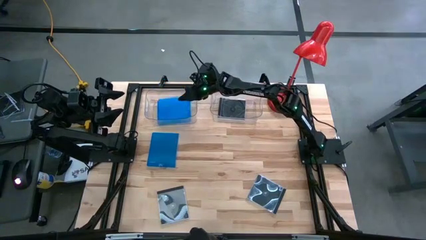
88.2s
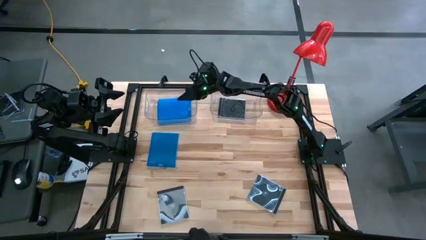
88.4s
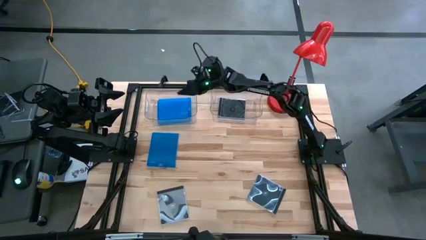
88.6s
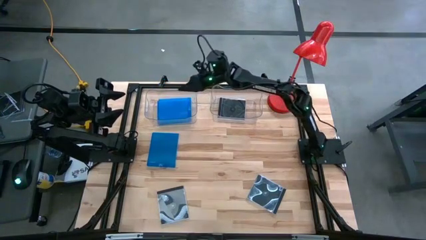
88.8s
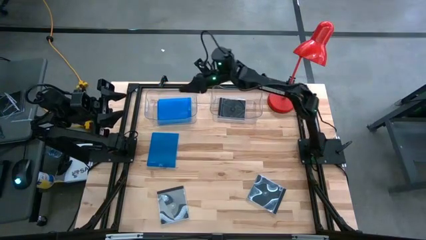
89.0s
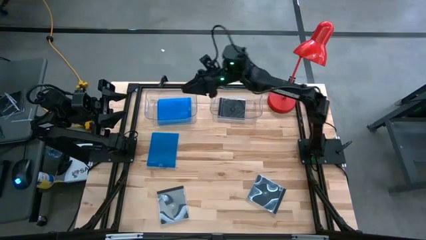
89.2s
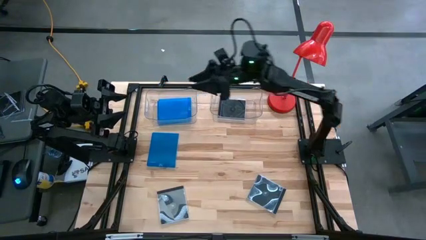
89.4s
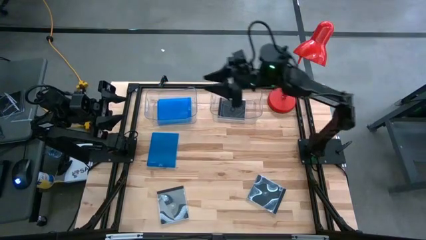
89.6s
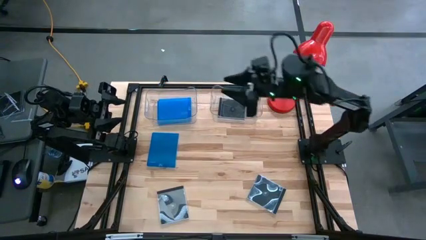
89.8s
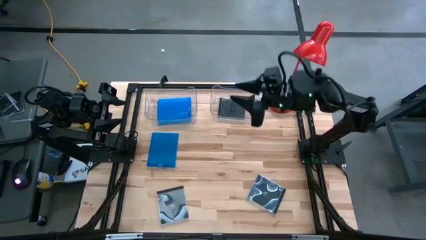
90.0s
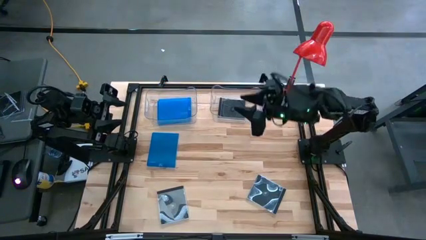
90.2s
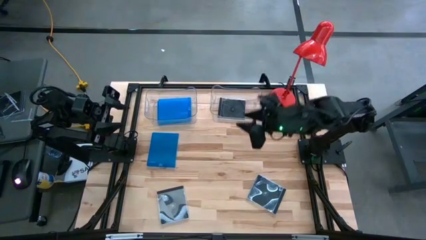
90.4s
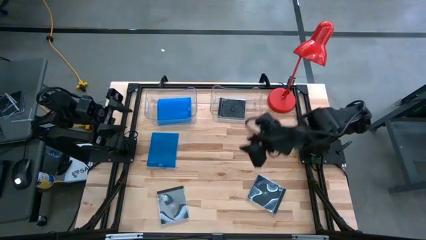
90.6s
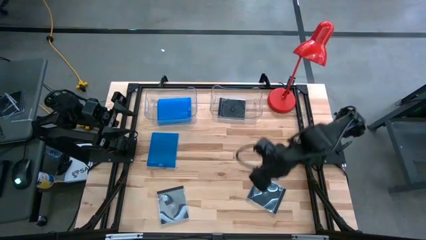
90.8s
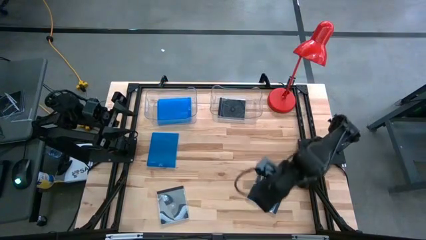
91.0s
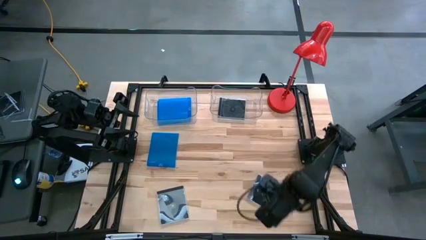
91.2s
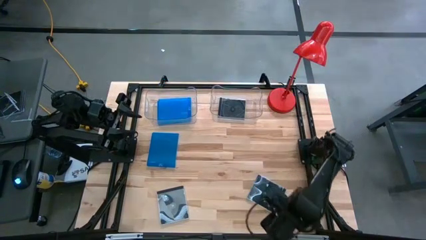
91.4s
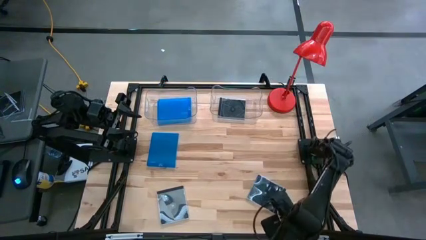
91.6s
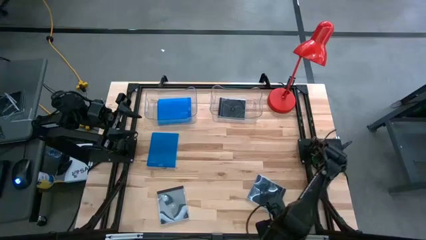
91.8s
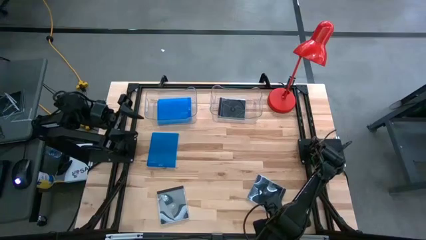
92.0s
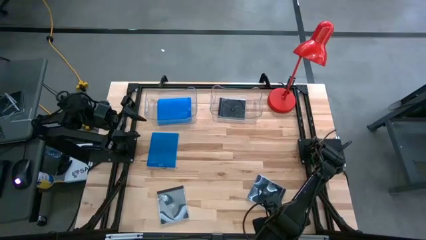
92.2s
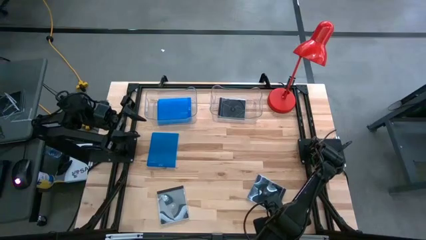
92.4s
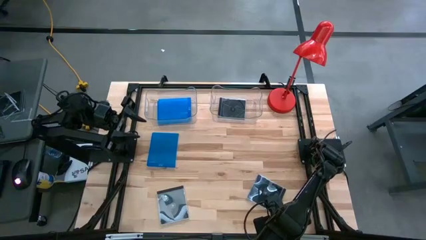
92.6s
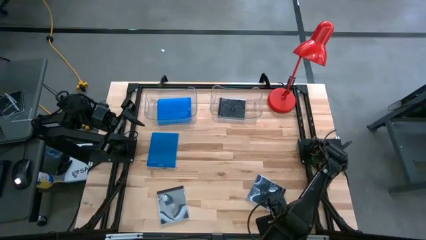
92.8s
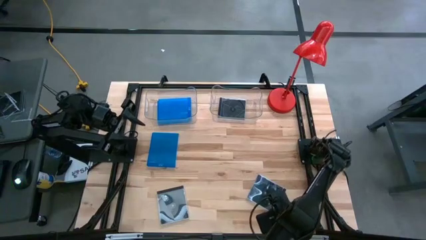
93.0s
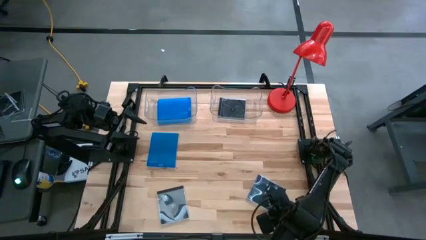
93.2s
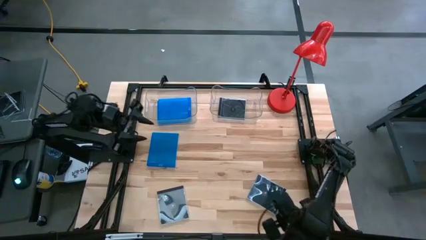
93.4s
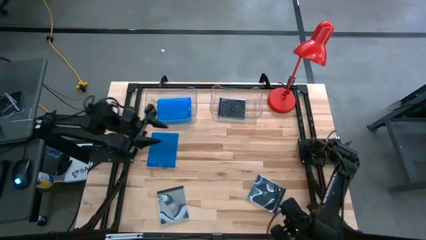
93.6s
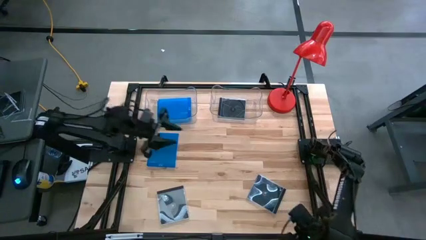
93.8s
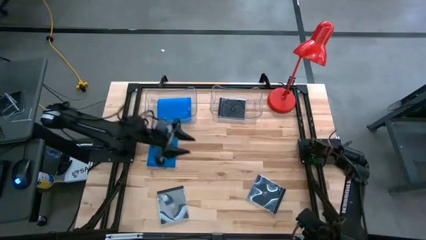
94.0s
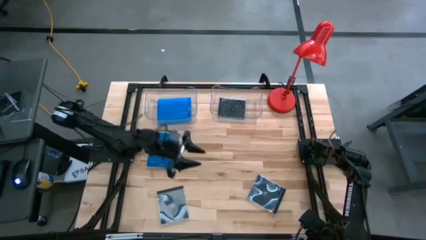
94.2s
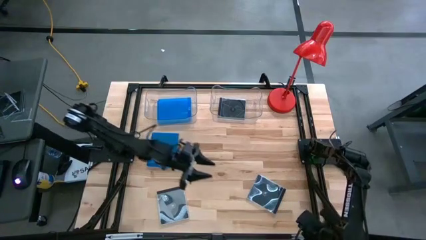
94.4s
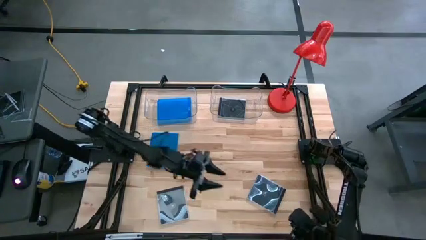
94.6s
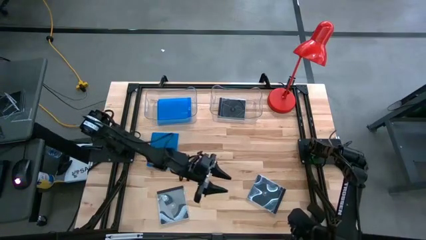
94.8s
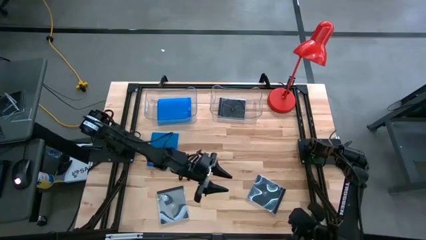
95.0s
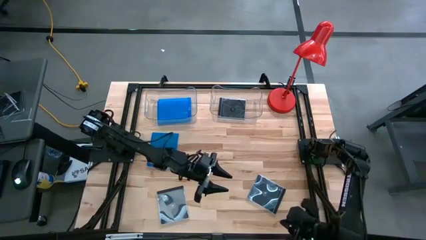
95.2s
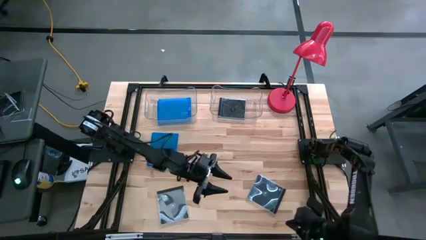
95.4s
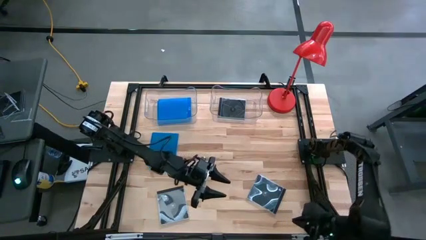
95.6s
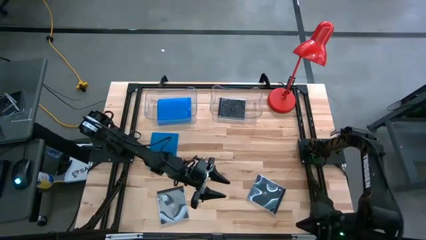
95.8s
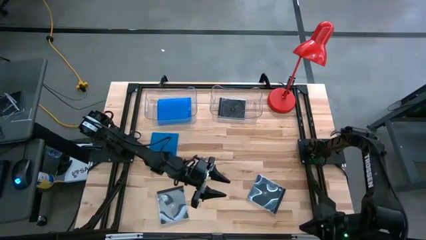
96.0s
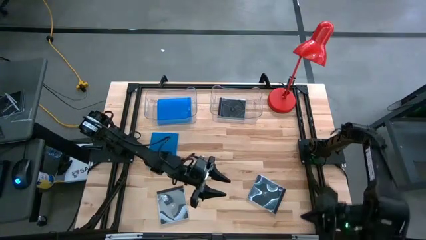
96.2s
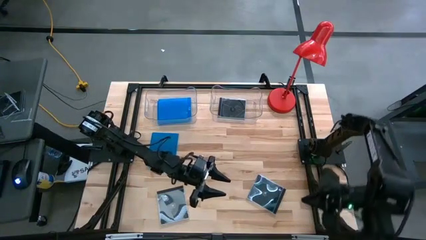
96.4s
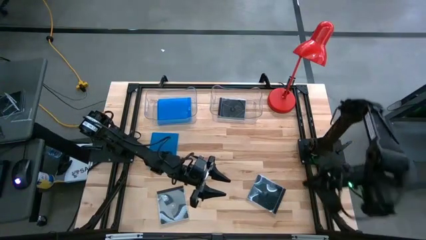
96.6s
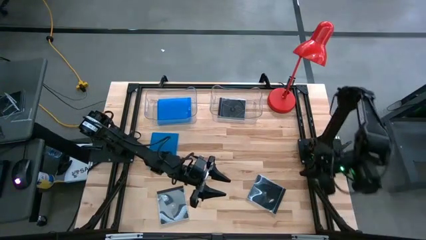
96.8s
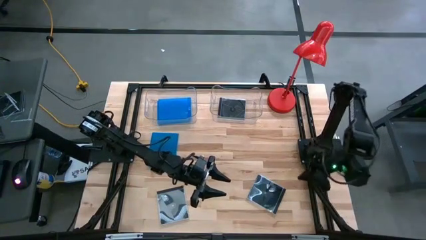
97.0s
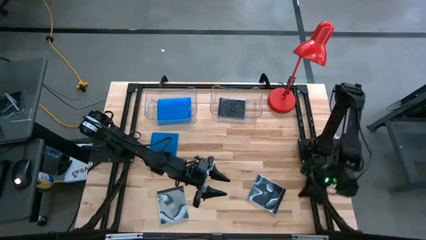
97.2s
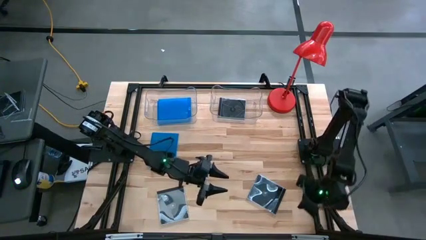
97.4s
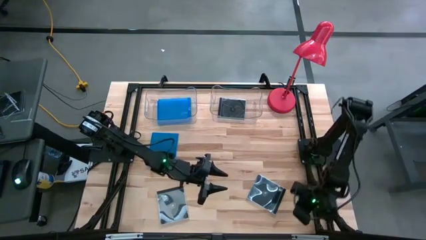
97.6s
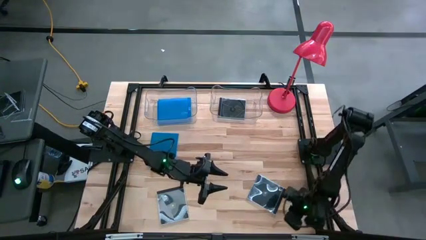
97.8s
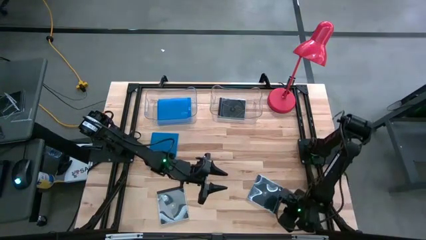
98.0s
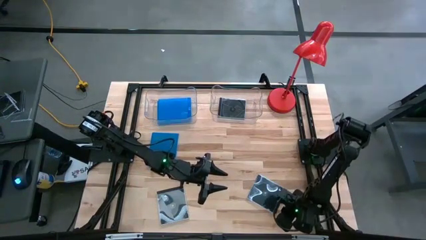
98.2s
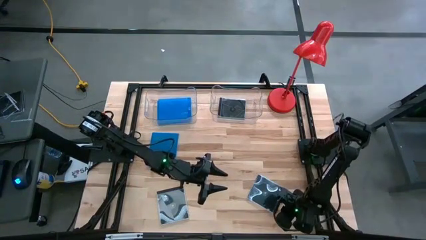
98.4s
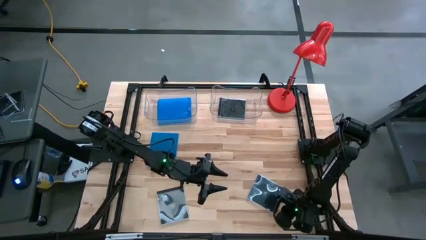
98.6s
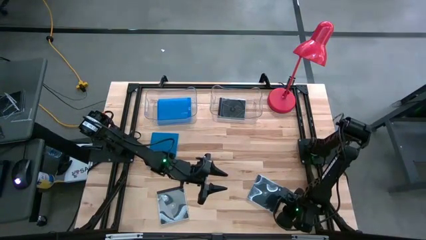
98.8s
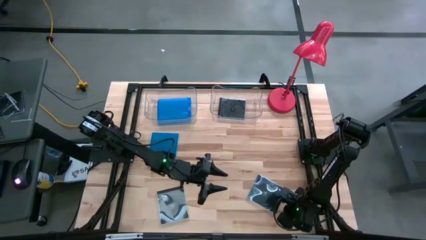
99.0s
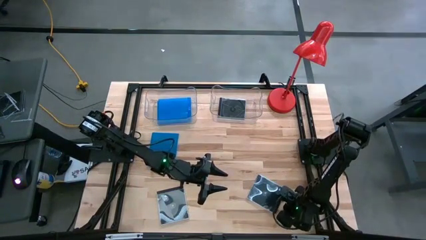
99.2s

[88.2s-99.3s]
Task: Pick & place jewel cases by type
Put the right black CD case into the right transparent bin

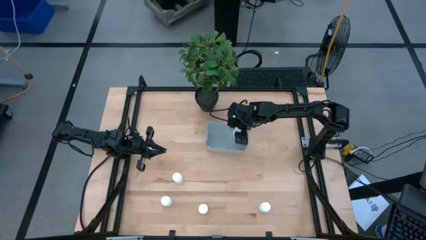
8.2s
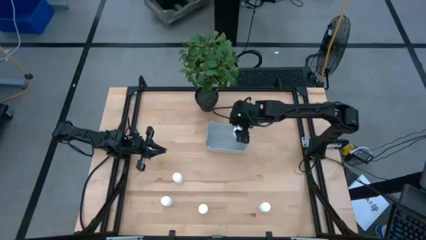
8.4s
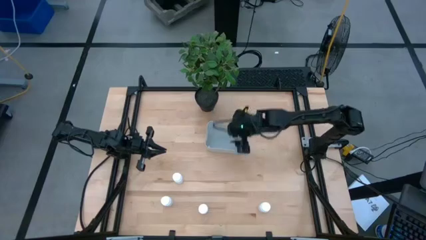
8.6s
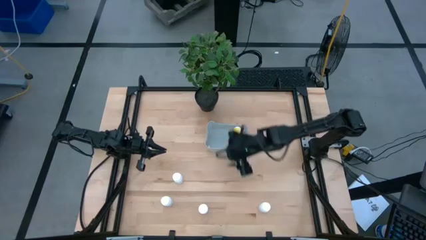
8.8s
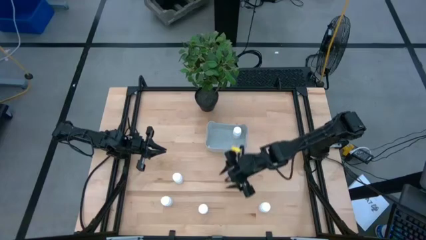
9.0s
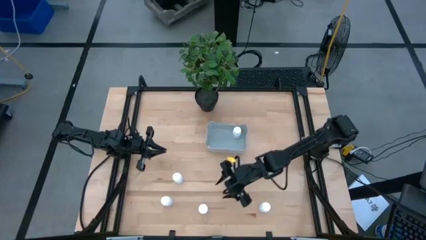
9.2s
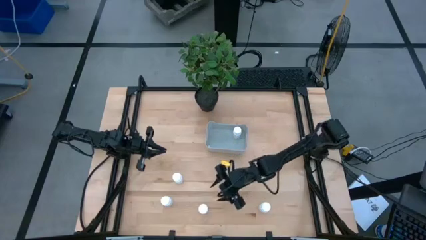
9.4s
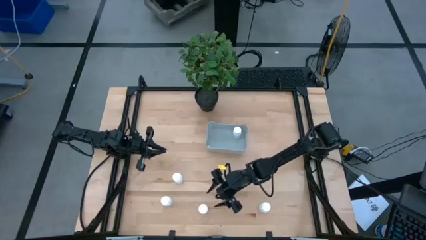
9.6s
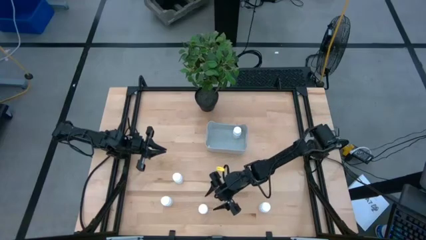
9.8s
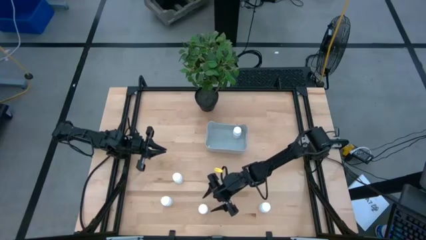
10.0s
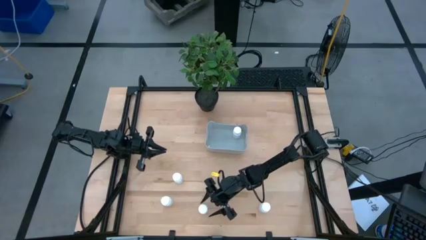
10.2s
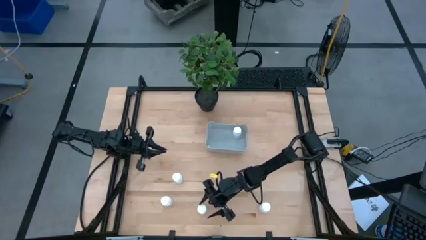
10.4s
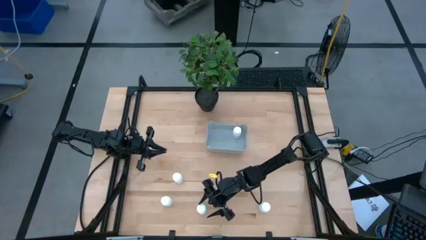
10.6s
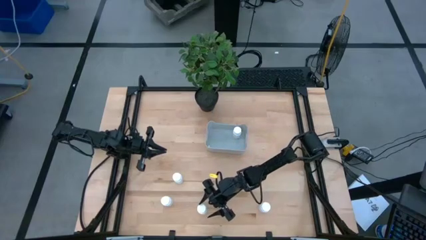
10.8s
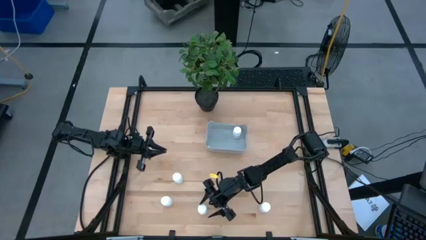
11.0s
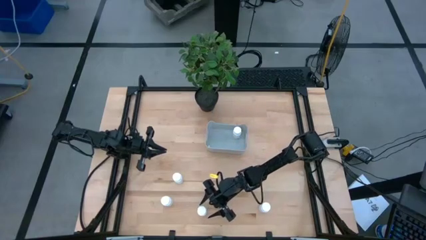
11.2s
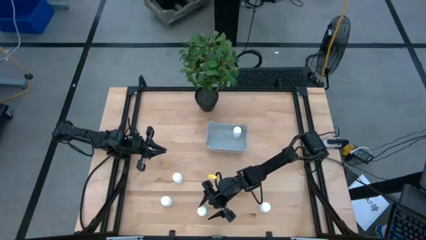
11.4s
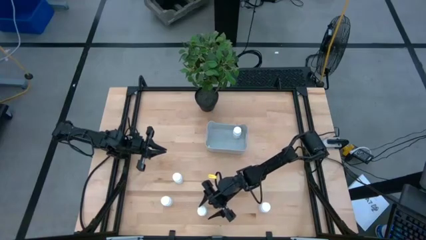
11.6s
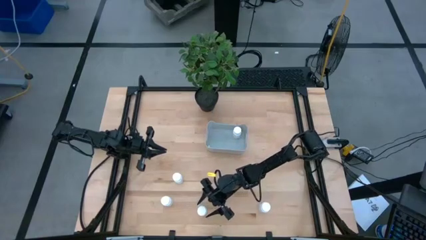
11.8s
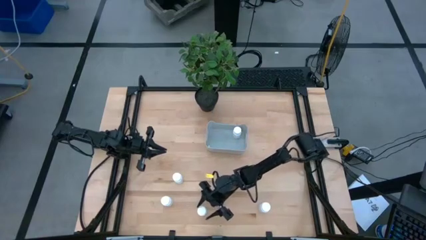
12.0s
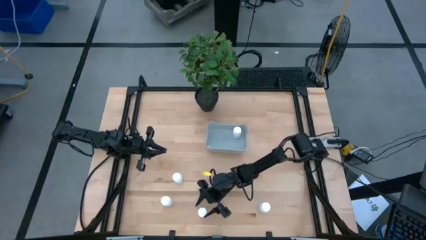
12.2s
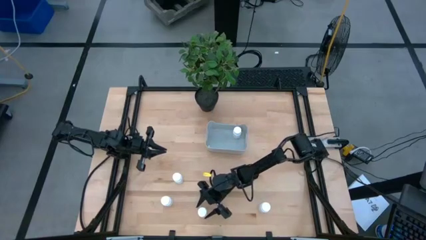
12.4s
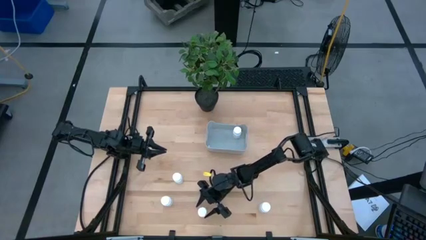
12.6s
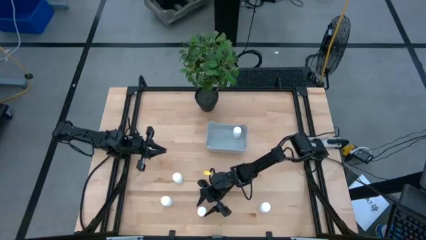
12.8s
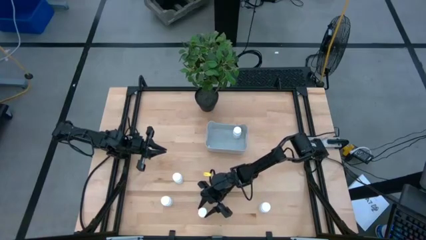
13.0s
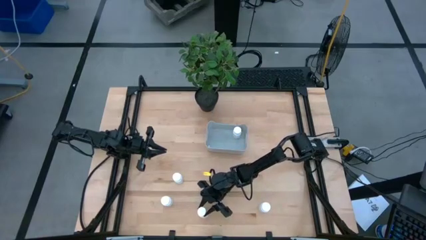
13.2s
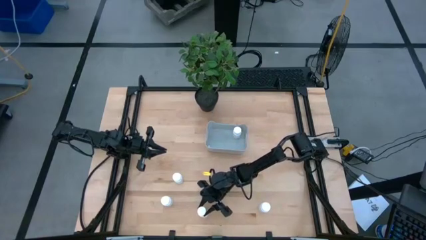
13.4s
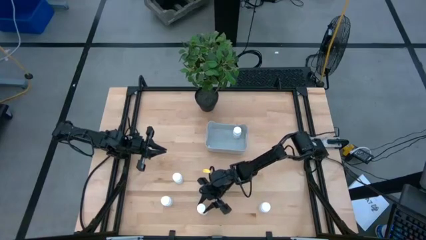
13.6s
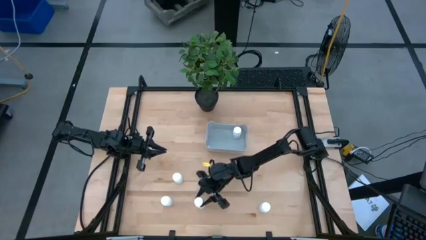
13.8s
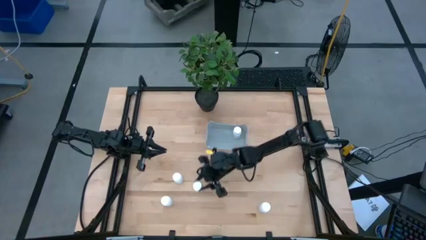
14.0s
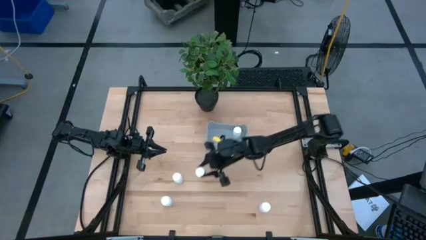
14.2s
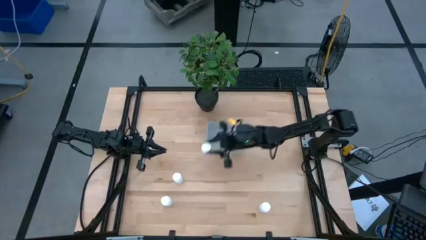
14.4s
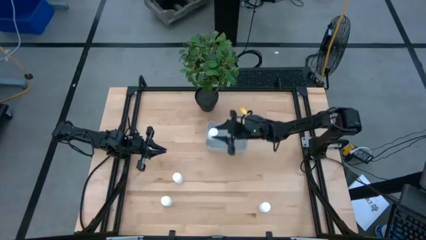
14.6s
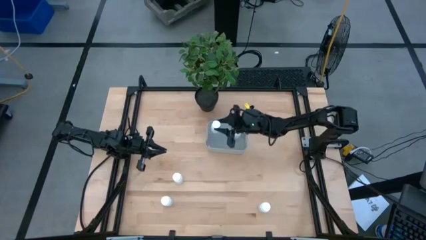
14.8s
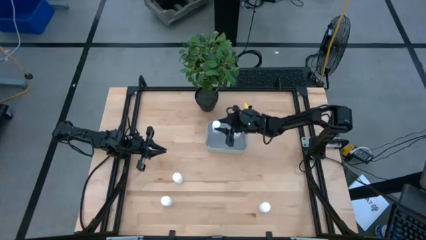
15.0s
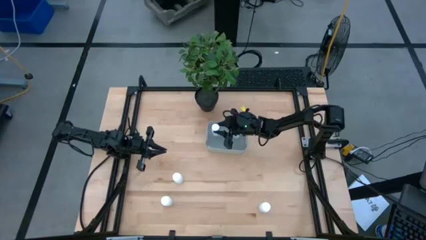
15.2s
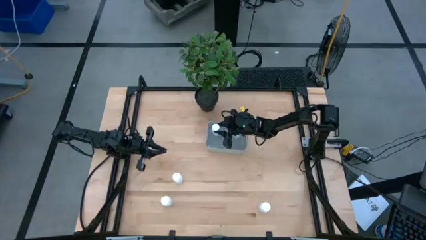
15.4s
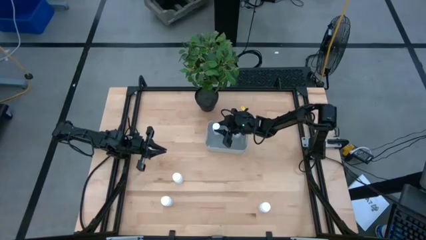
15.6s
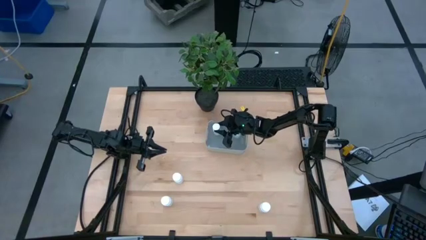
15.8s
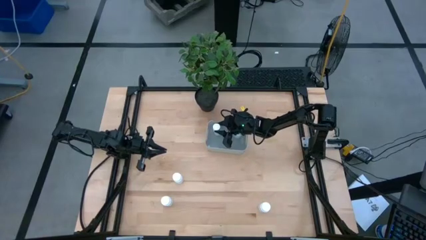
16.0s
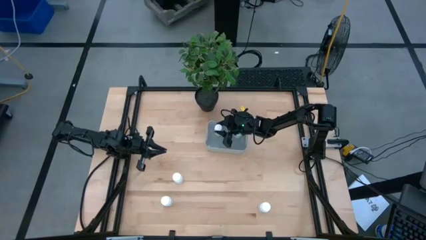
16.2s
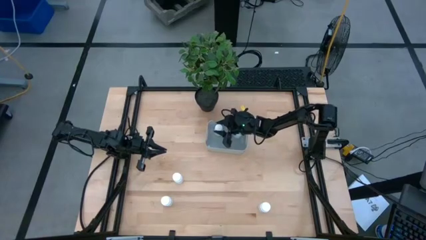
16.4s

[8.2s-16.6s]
Task: Pick and place pill bottles into a basket
Put the white medicine bottle into the gray bin
